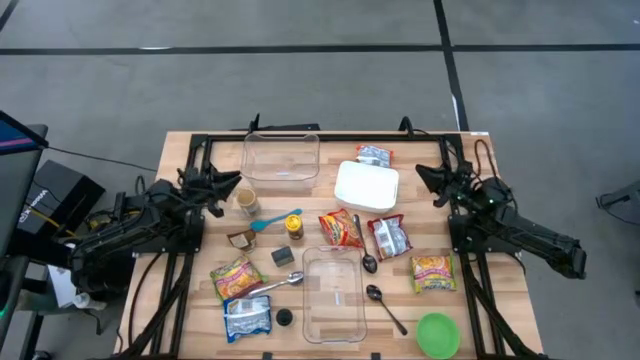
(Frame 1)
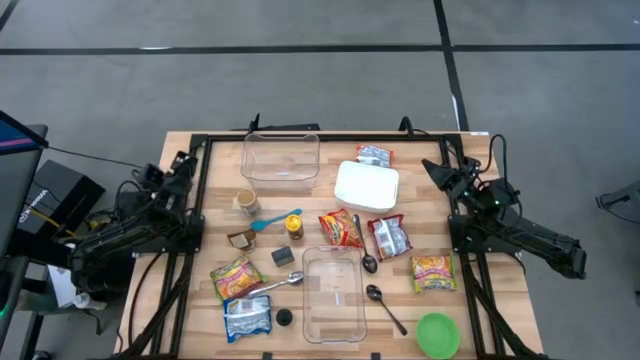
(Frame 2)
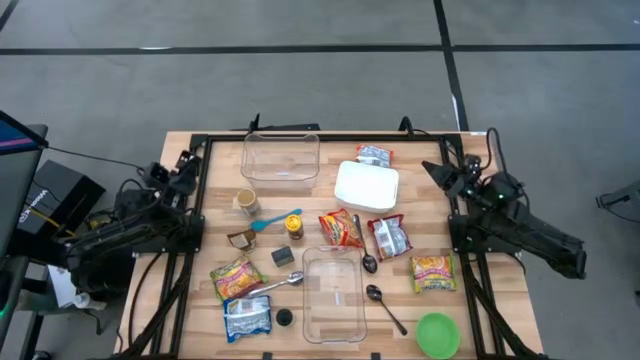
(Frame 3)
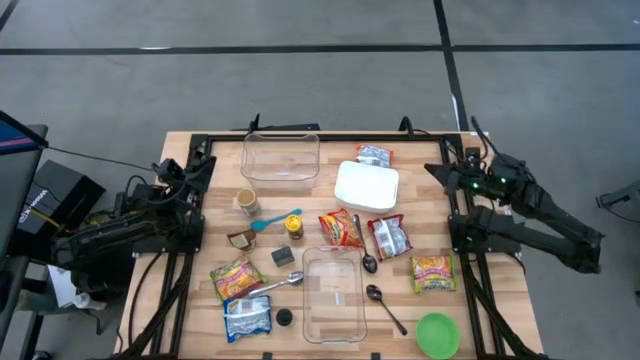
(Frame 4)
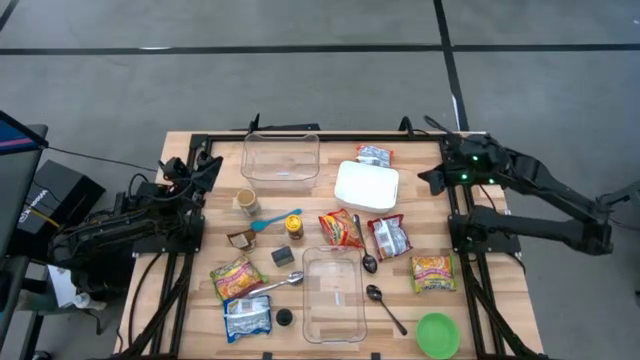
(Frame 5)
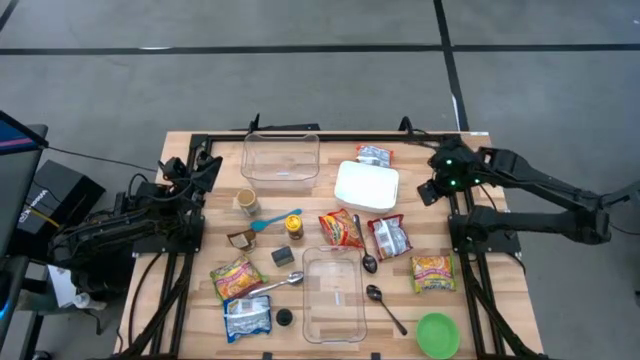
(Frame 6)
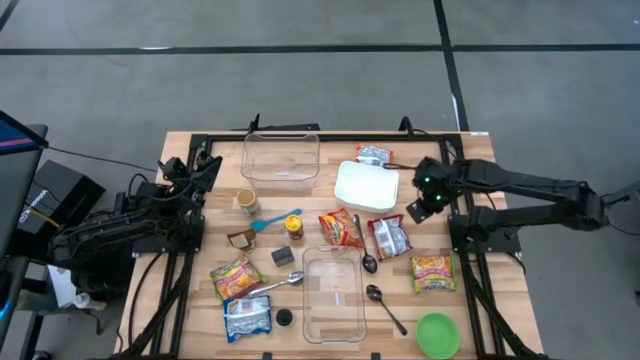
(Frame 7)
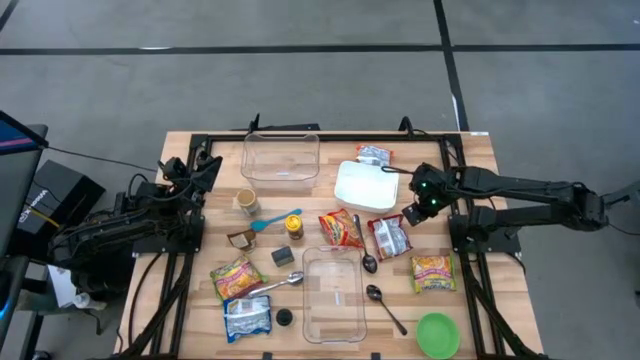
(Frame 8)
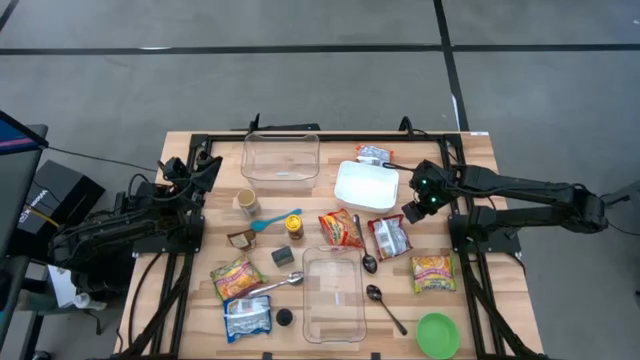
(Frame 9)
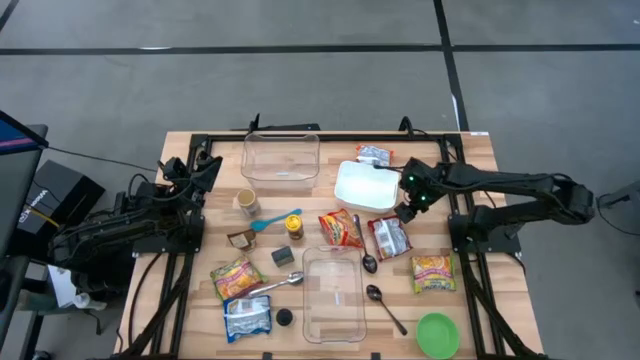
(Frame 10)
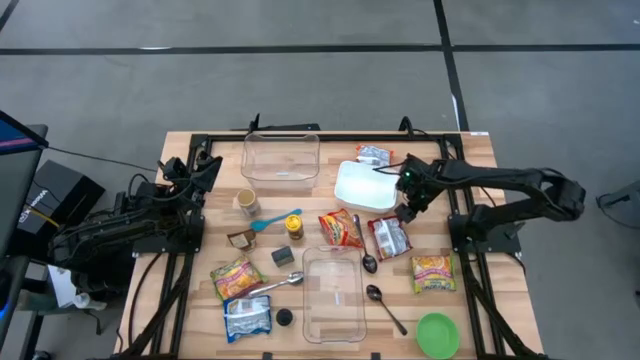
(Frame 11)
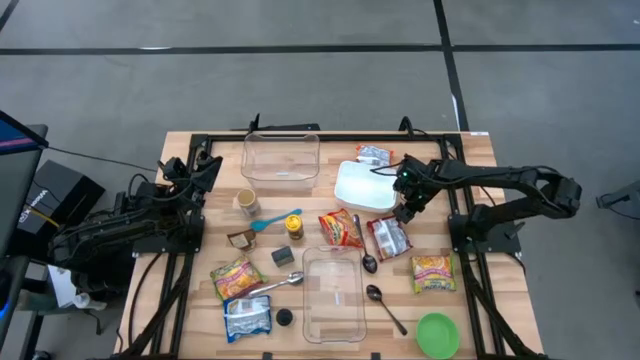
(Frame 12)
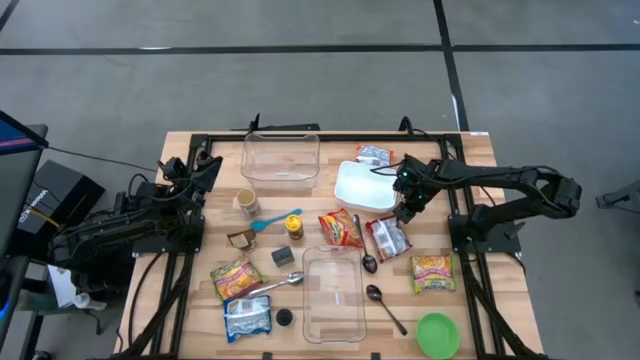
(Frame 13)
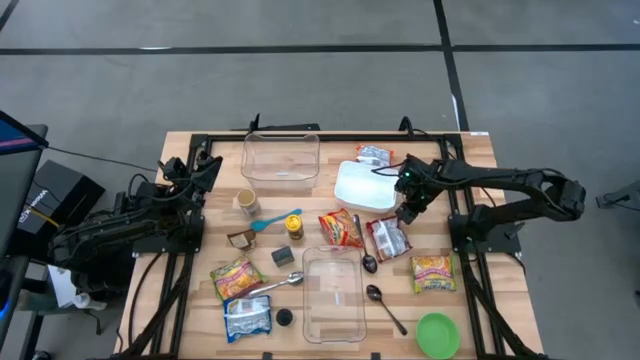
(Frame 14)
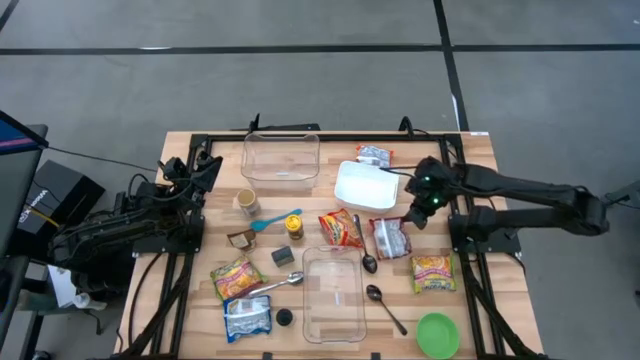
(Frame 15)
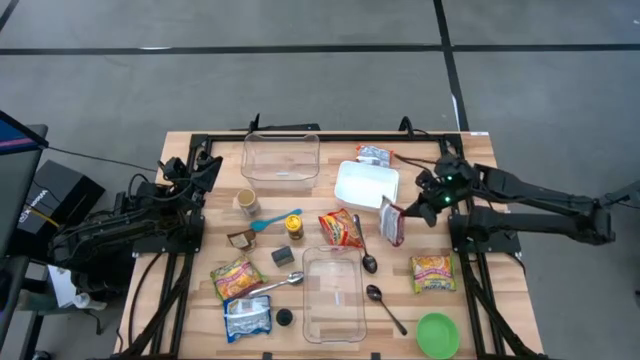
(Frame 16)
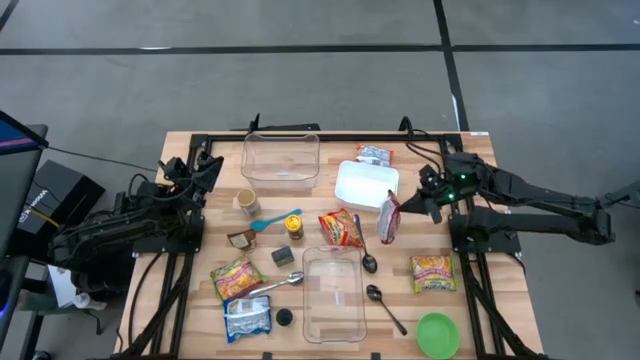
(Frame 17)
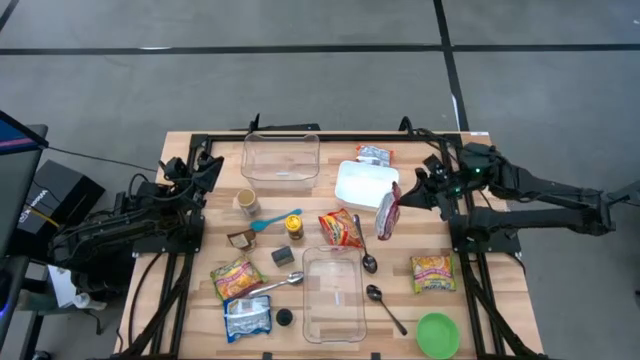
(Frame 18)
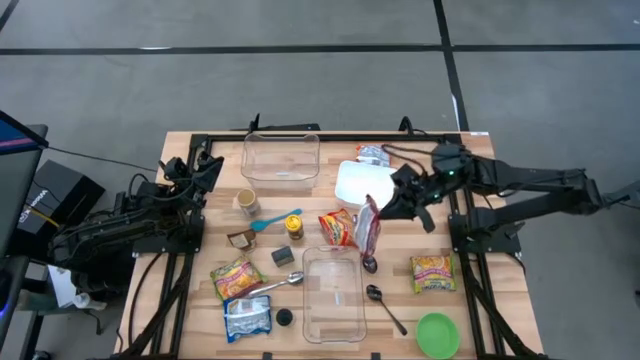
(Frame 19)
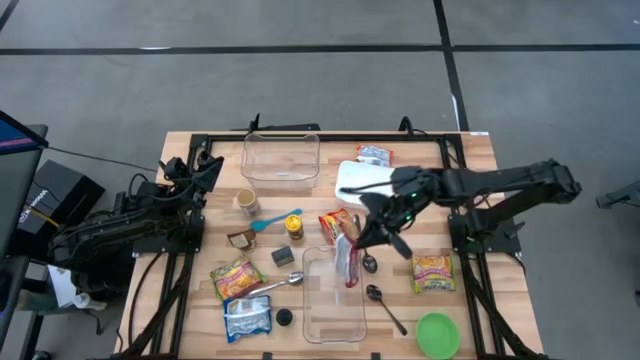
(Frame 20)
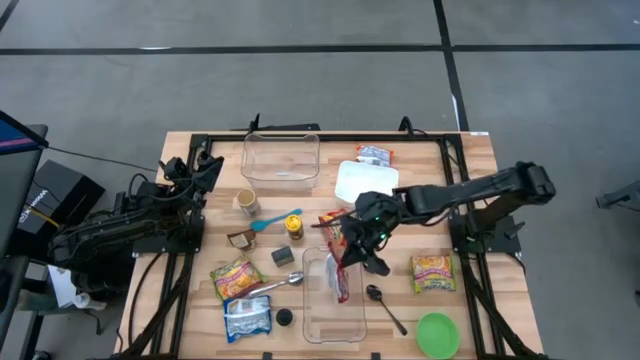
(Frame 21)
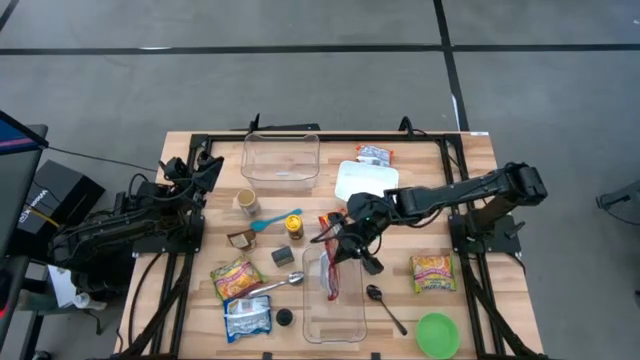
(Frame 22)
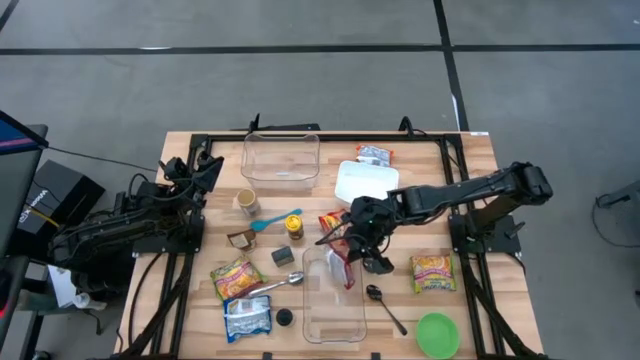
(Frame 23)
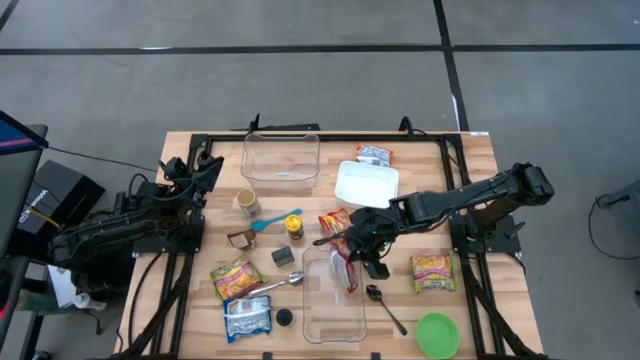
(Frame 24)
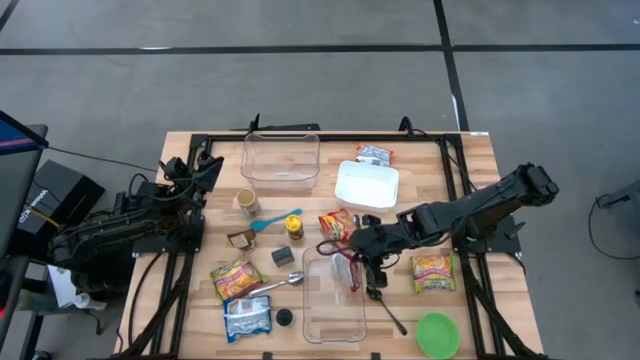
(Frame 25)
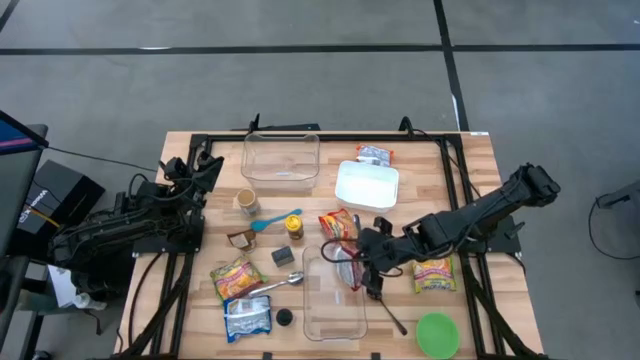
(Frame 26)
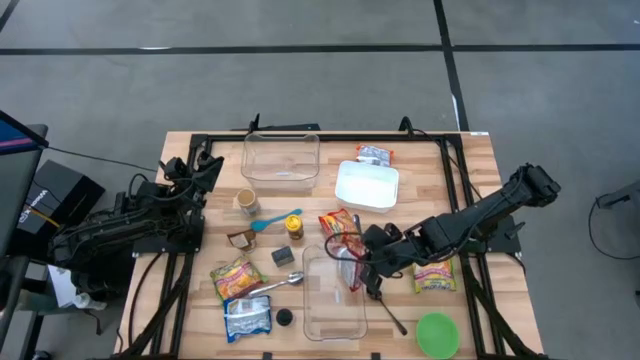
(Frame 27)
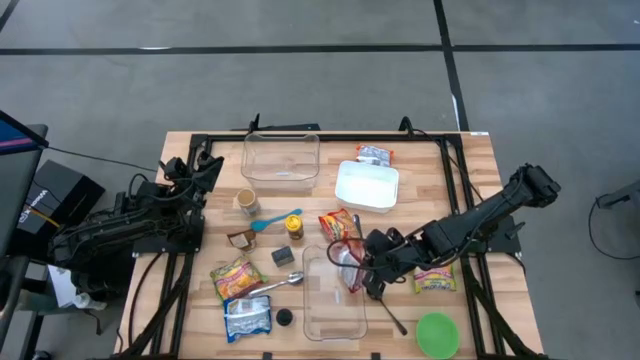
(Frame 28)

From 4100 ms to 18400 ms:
Task: Pick & Place Food Item
Put the red noodle pack into the bottom transparent bin

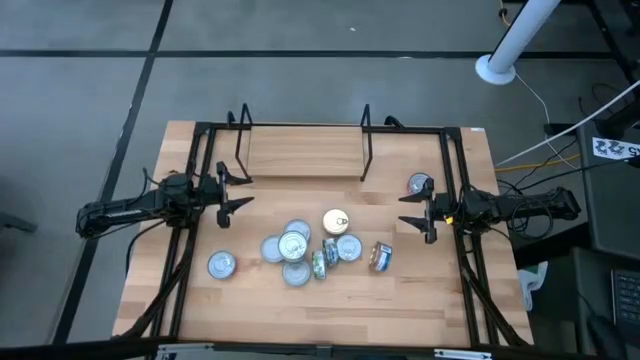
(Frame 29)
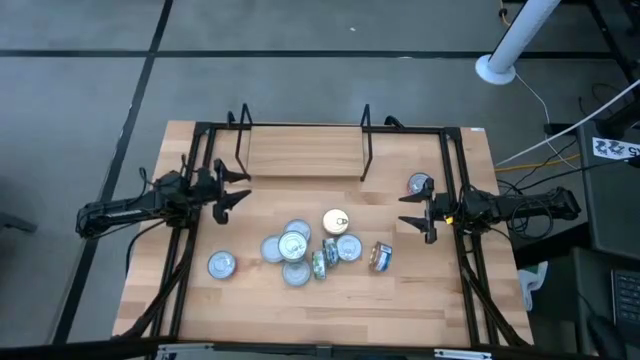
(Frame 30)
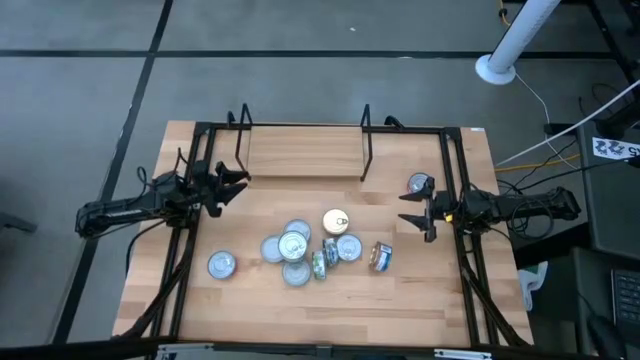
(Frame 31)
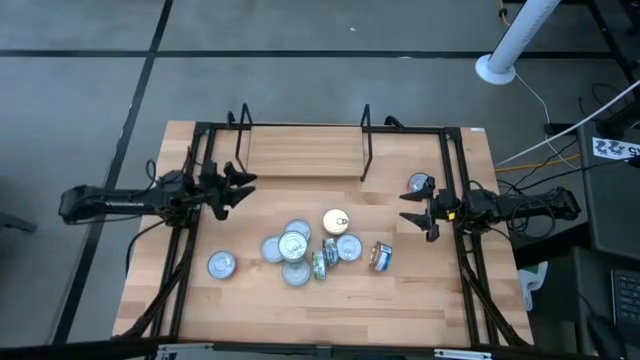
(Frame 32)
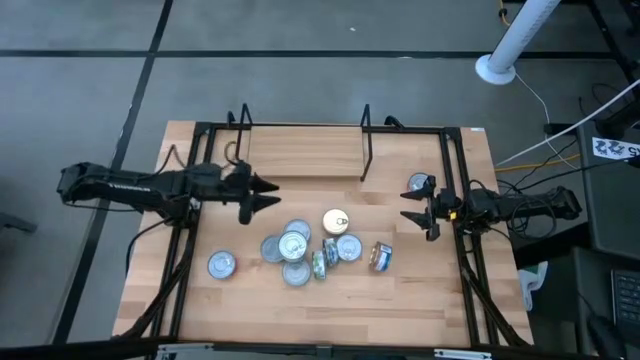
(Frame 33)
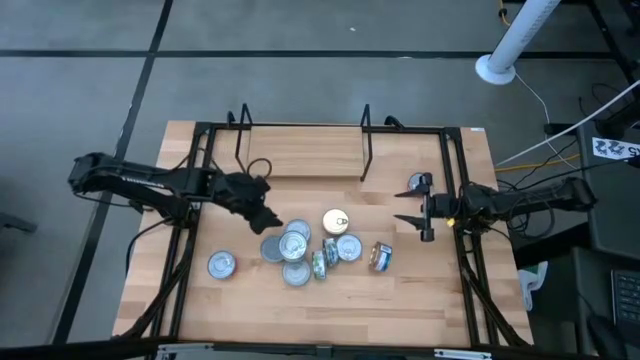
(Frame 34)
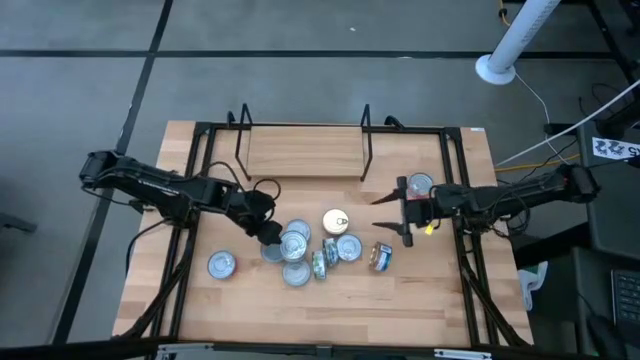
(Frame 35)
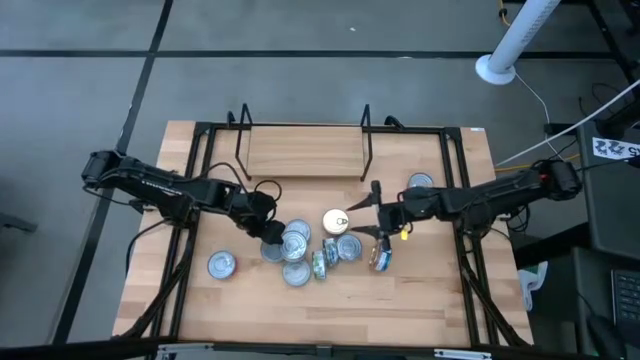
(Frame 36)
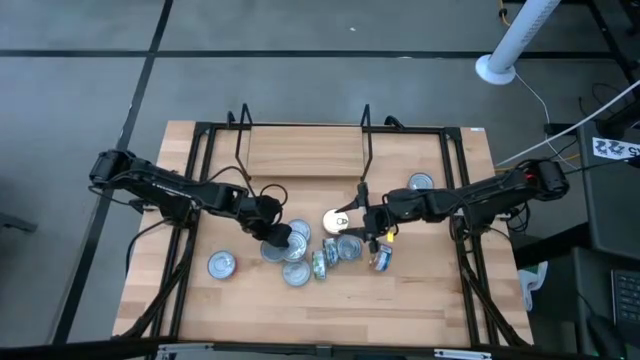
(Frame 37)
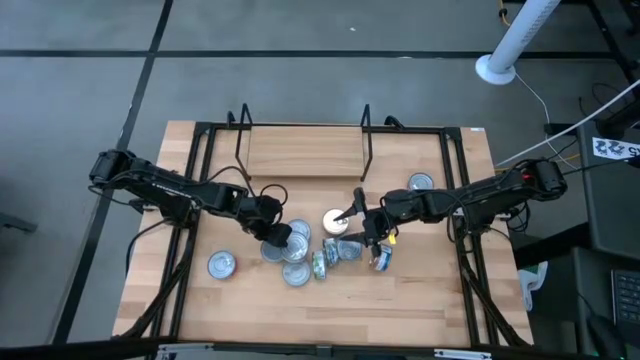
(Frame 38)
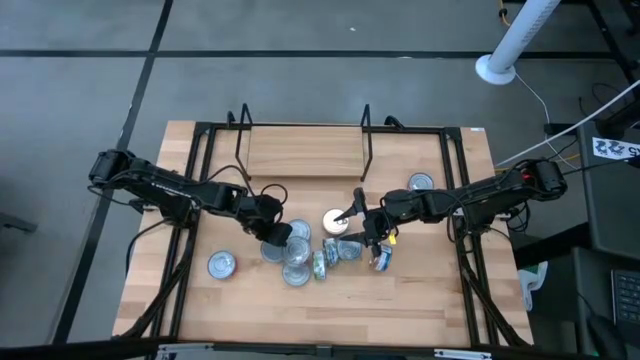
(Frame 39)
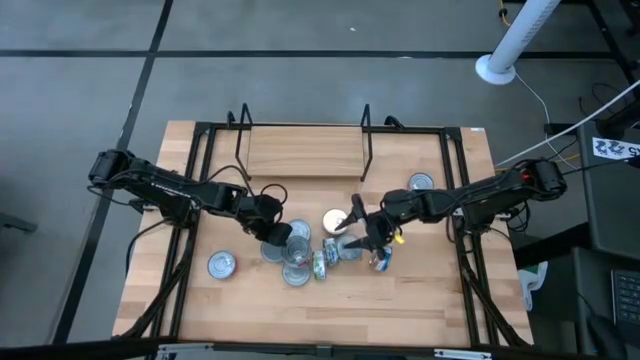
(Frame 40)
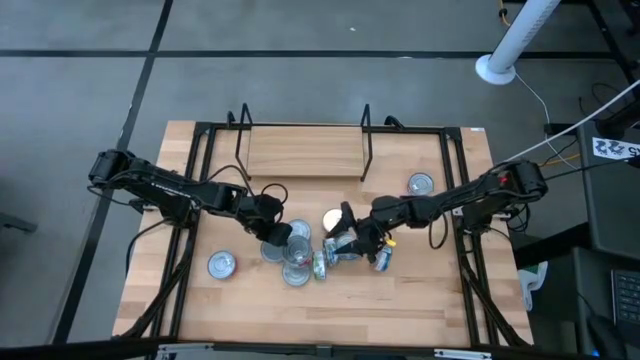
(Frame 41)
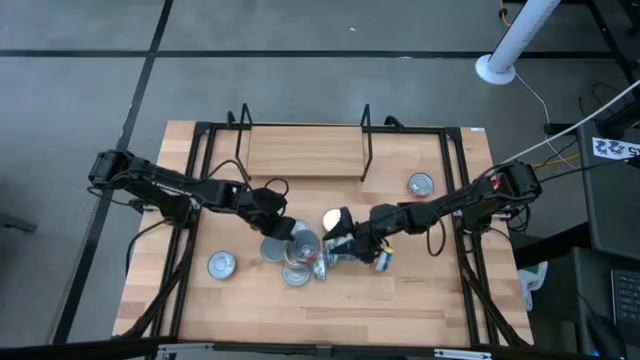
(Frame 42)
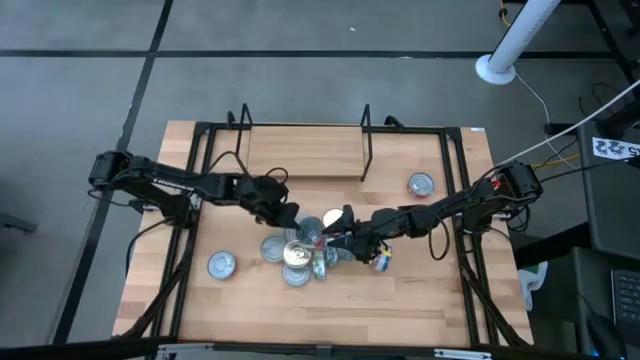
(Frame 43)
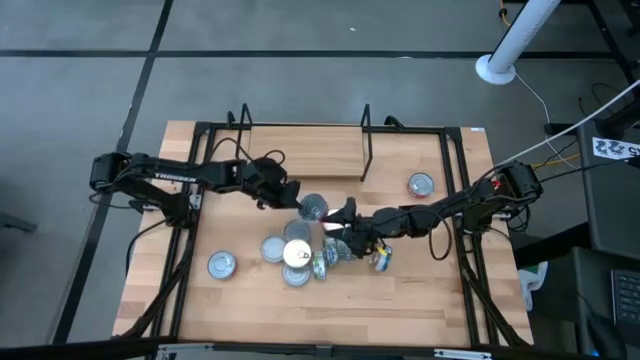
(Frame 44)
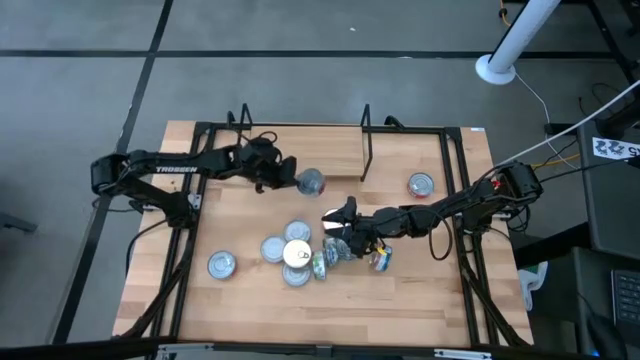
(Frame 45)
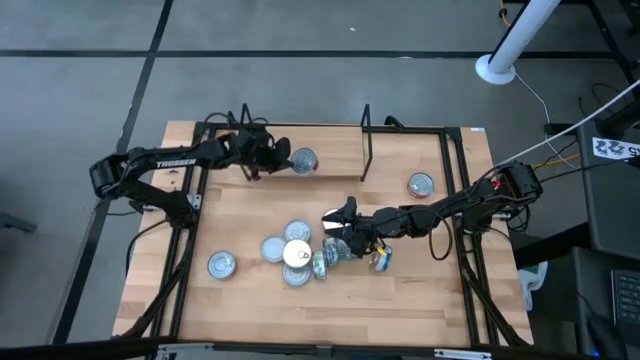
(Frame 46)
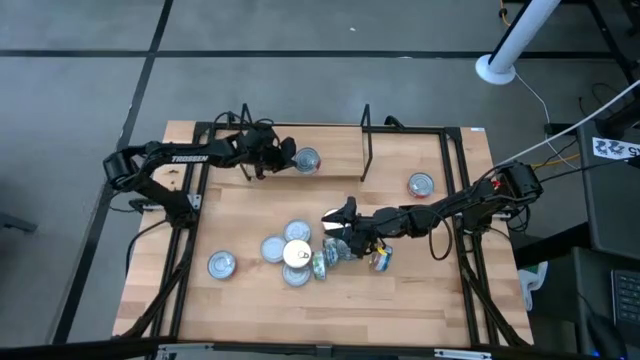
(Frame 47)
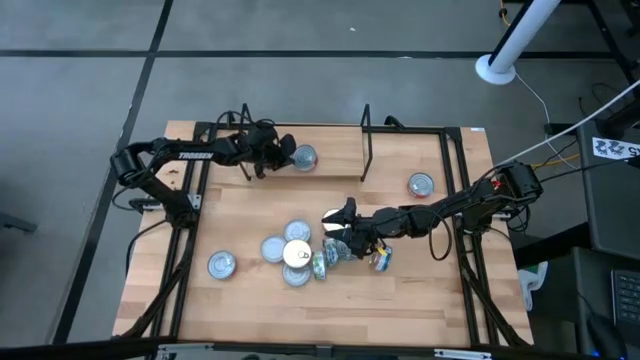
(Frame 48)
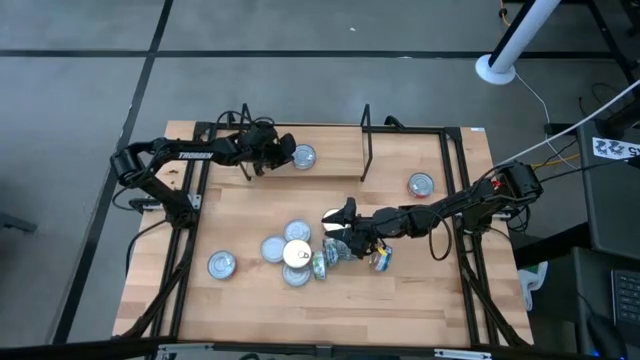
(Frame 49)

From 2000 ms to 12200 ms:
Task: Stack canned seafood by type on shelf
Put the red tuna can on the shelf
